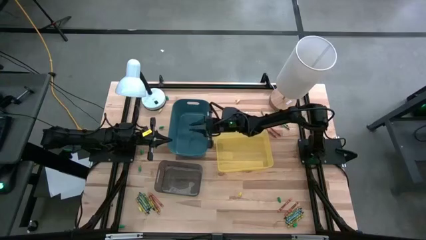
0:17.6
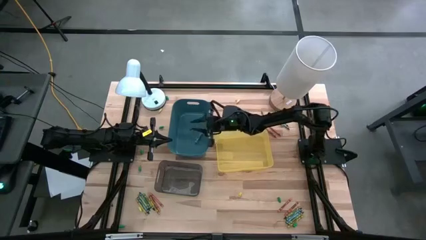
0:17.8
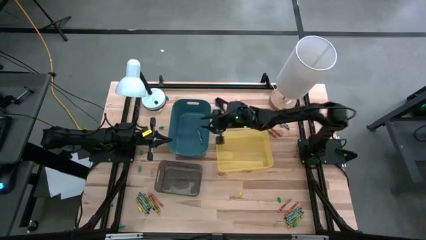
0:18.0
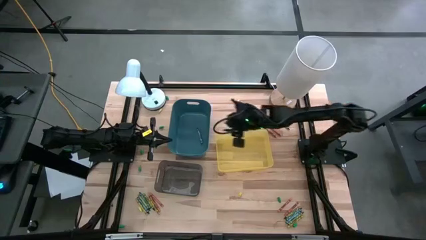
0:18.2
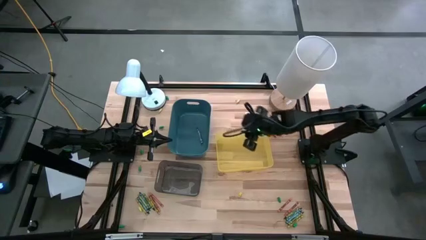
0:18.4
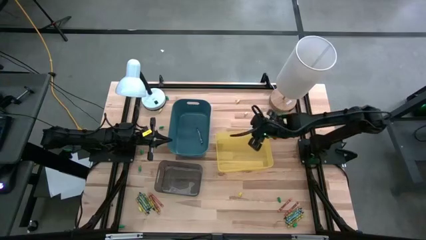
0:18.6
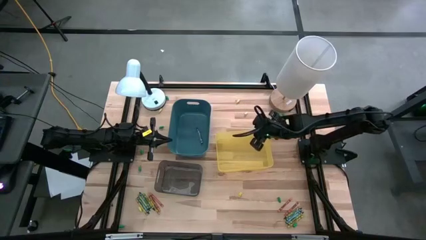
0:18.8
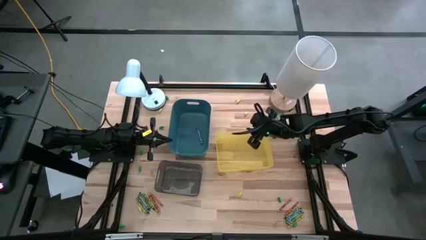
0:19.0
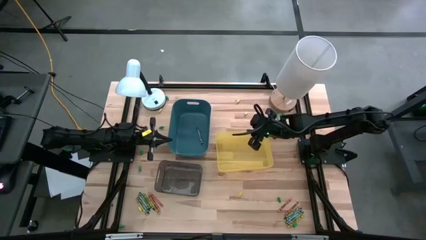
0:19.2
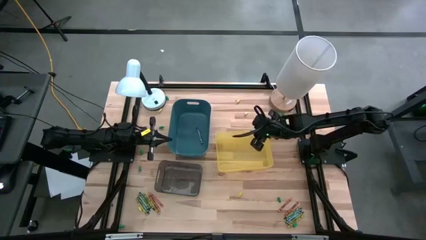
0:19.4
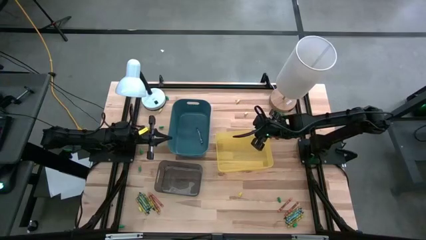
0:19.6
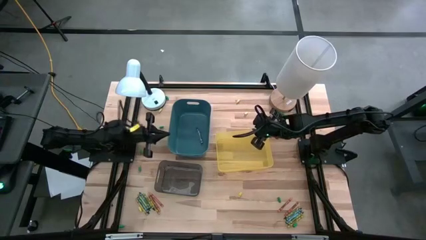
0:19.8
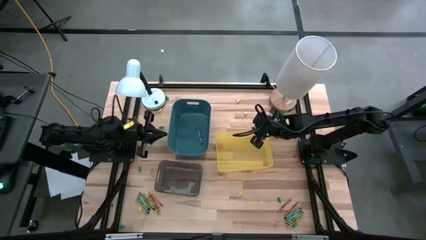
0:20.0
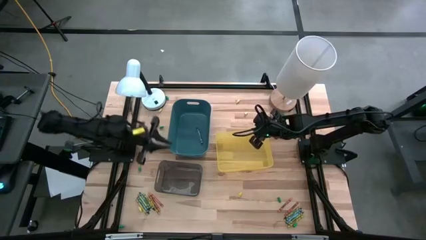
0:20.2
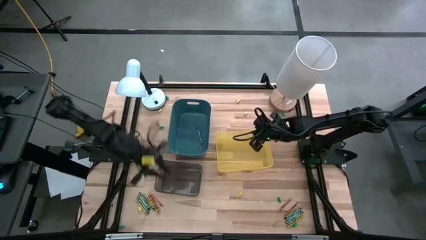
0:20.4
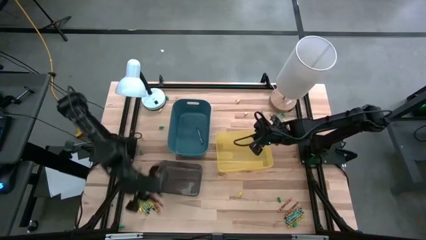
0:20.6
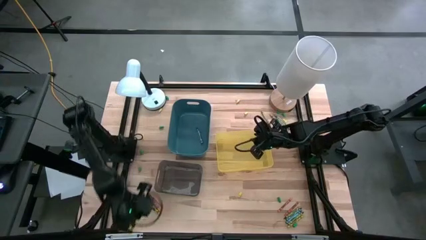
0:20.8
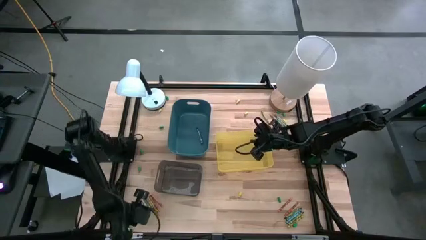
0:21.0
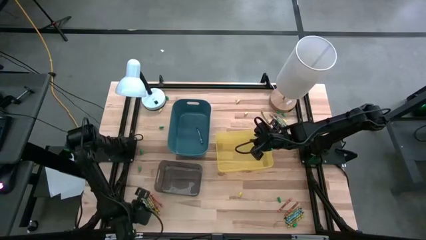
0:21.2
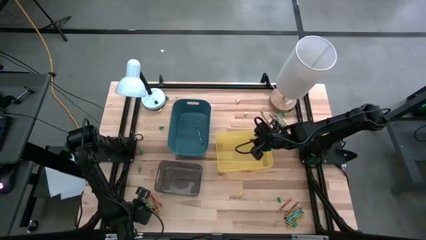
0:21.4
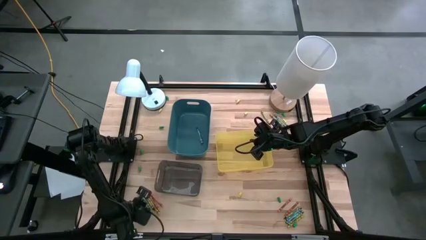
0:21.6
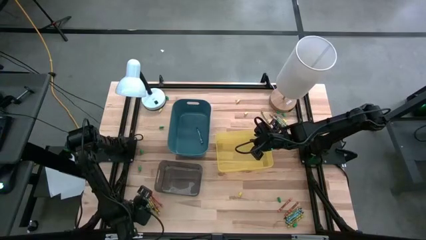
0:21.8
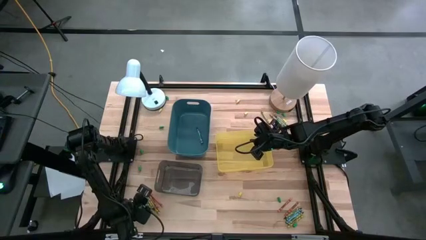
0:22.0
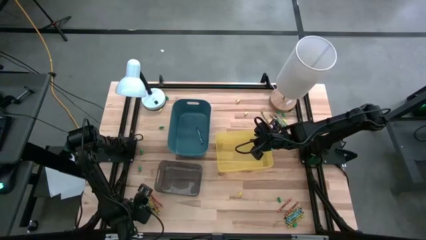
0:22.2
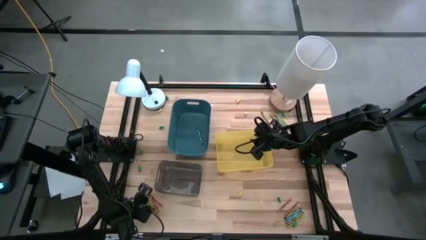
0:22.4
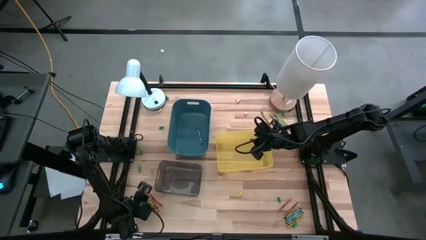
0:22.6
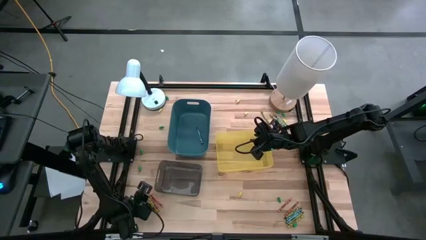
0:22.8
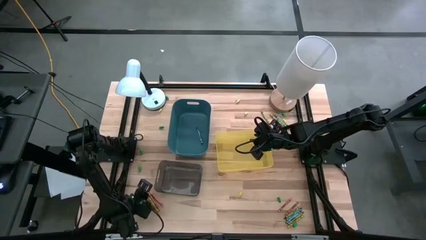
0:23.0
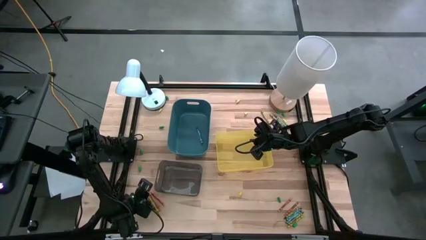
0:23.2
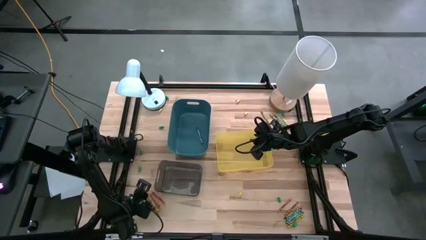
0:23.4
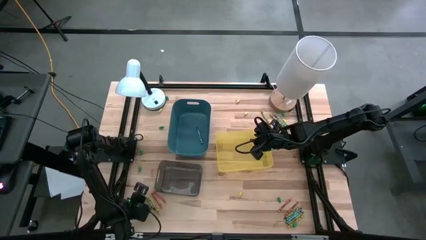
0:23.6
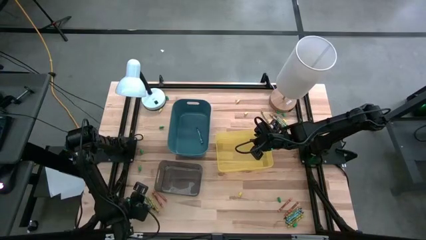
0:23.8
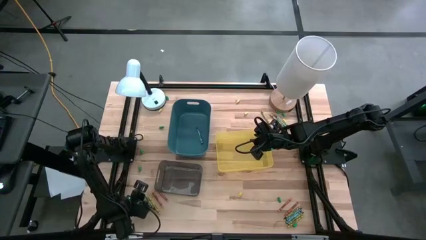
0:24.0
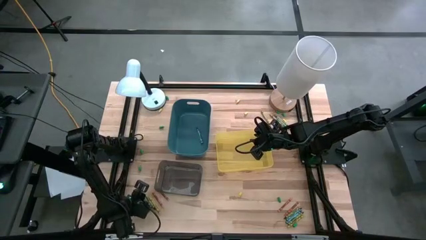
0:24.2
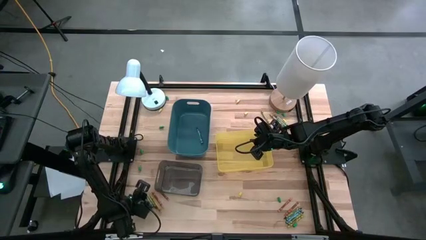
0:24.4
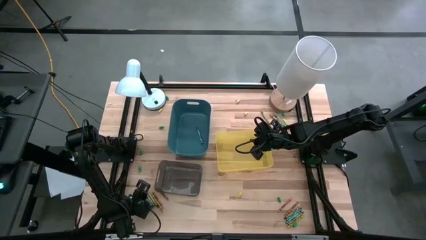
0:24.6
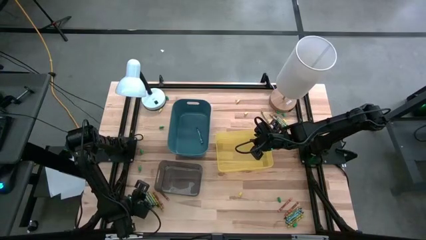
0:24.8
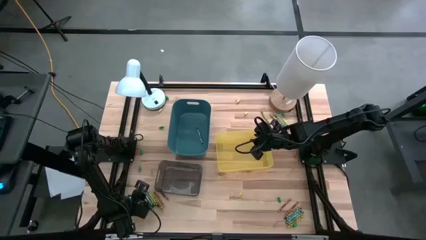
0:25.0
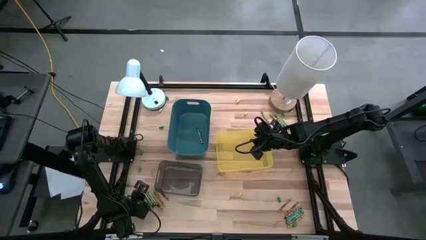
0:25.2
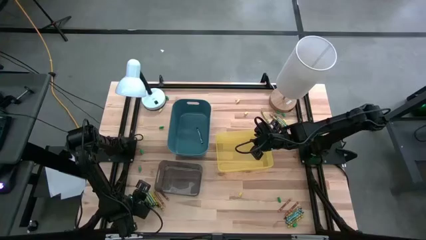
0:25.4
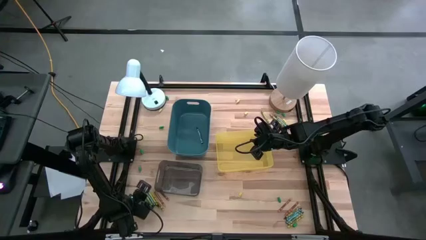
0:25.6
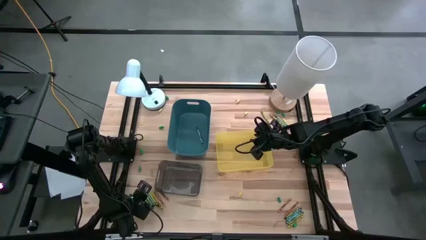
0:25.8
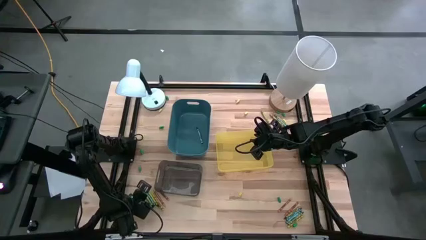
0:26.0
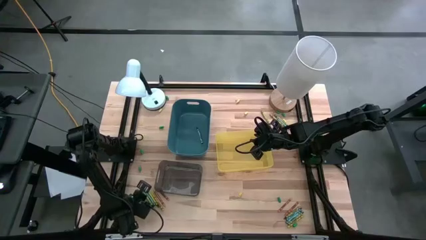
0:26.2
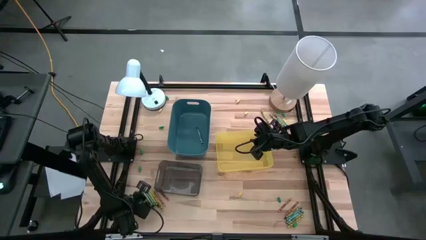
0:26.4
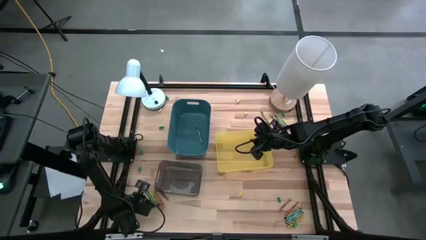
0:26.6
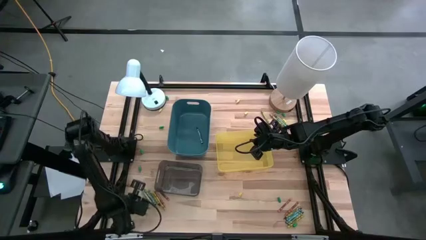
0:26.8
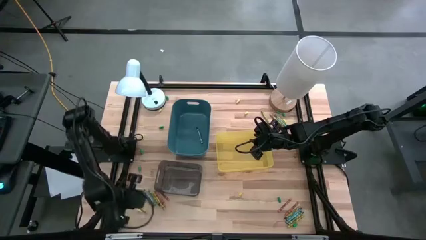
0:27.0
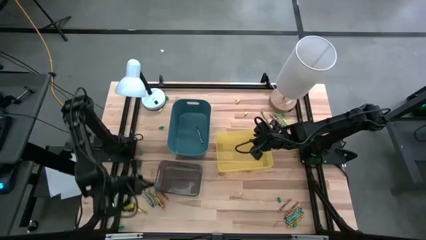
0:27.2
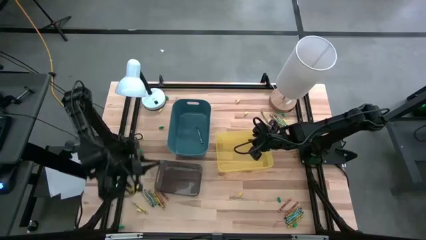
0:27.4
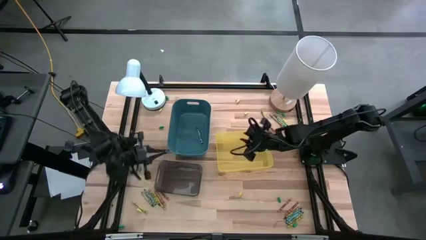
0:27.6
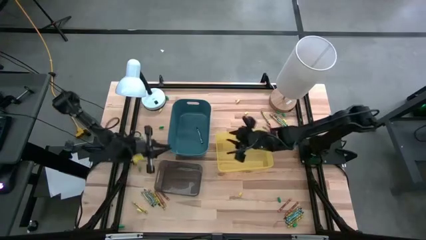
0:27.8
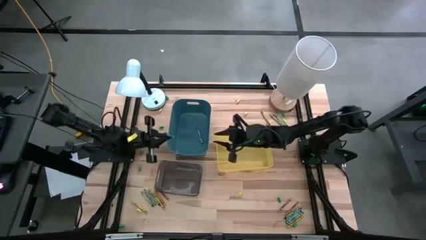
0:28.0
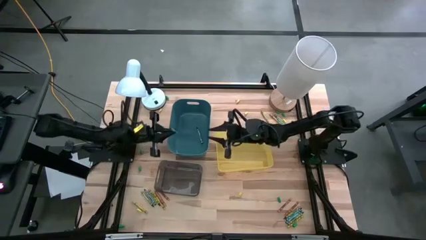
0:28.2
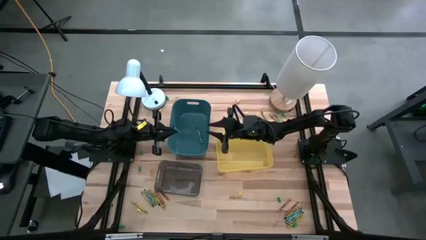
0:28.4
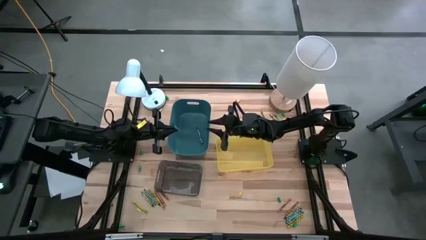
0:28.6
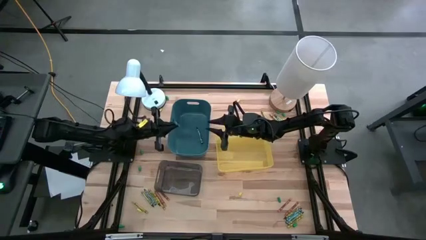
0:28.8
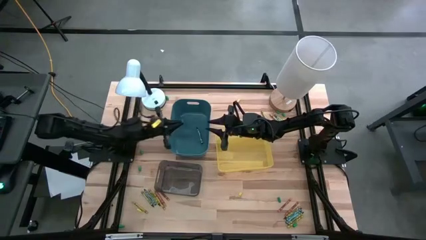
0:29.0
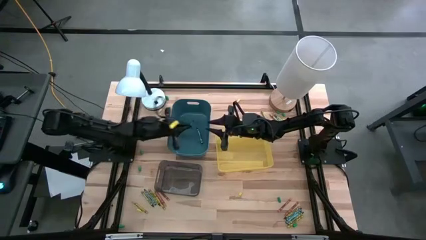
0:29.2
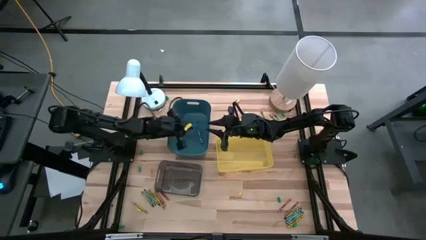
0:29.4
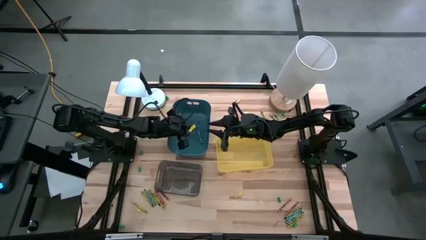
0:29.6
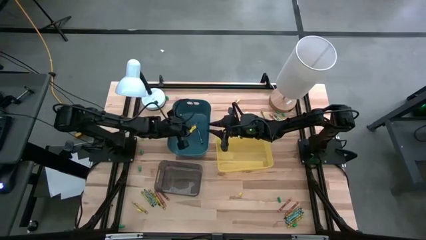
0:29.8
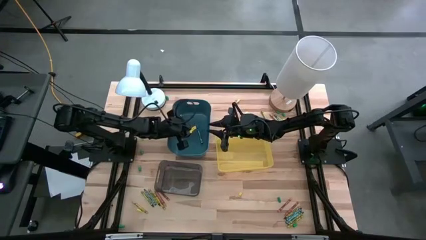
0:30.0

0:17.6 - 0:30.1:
Task: Sort crayons
Put the blue crayon into the blue bin

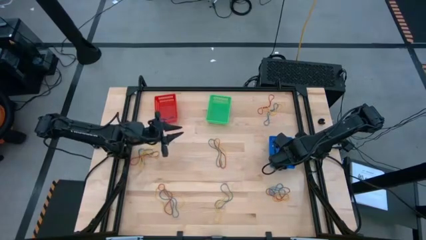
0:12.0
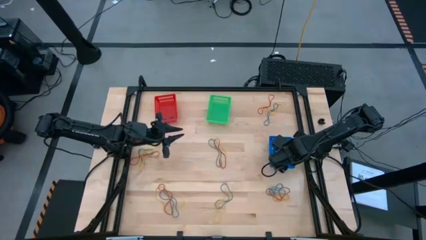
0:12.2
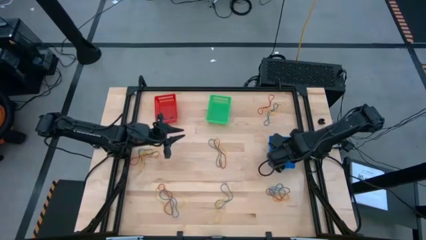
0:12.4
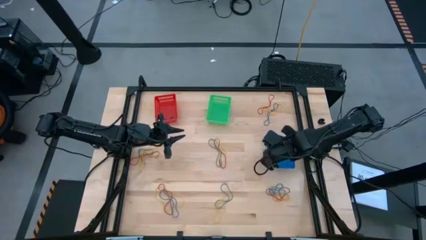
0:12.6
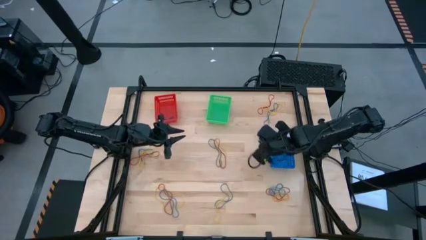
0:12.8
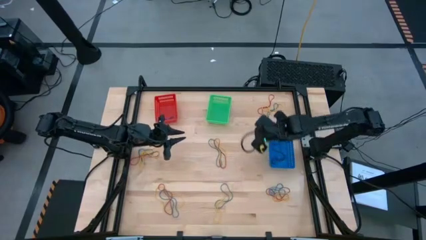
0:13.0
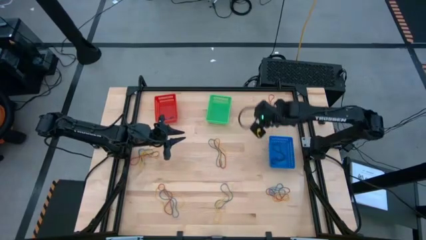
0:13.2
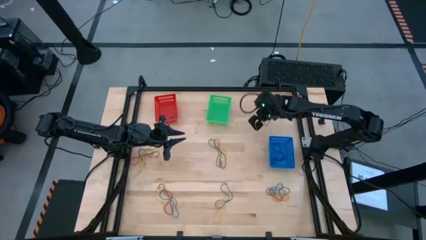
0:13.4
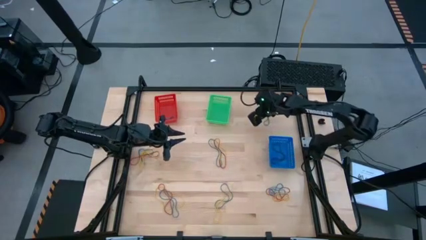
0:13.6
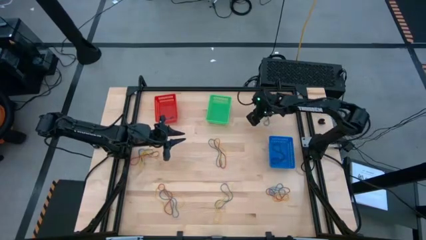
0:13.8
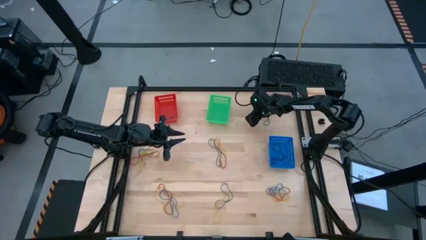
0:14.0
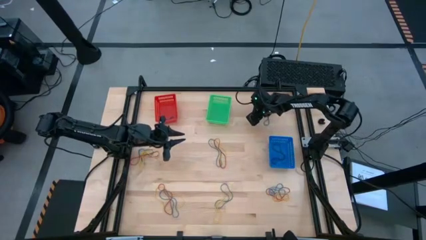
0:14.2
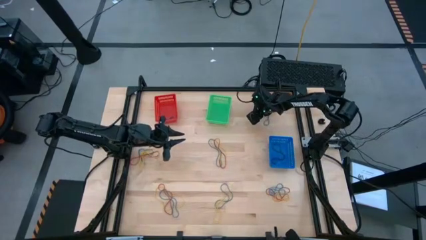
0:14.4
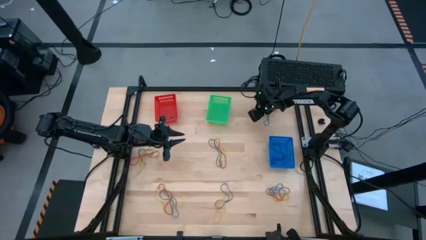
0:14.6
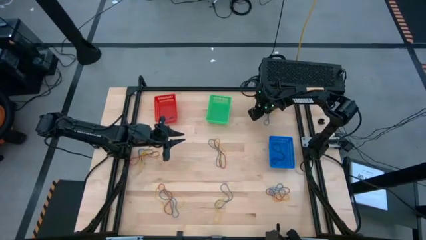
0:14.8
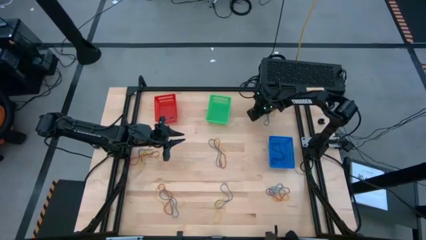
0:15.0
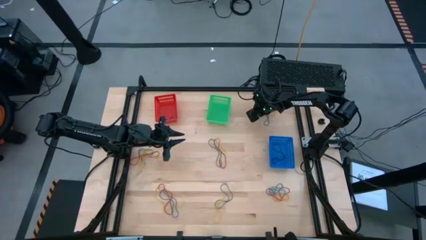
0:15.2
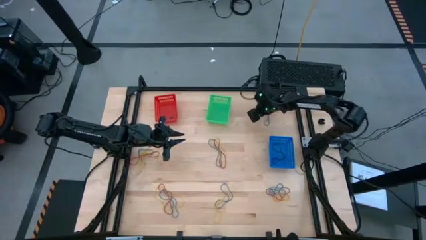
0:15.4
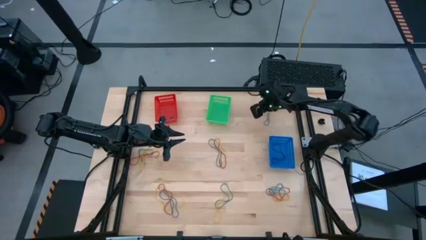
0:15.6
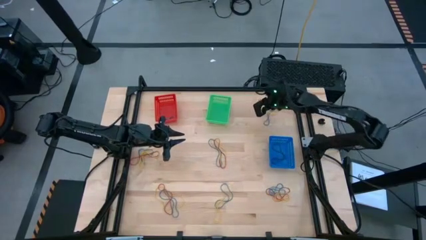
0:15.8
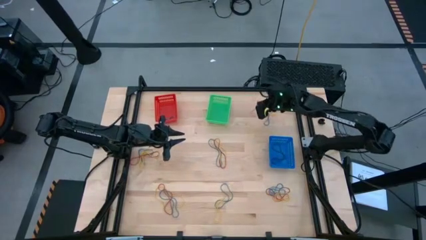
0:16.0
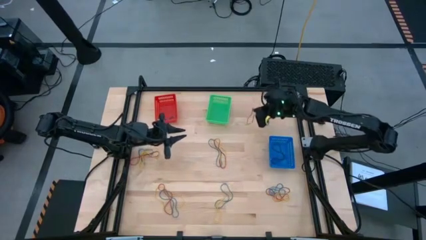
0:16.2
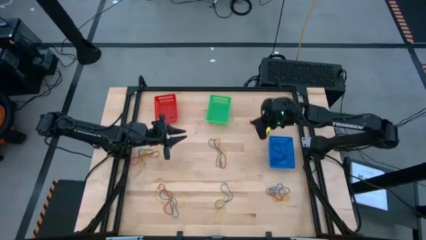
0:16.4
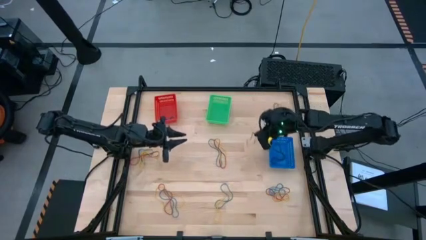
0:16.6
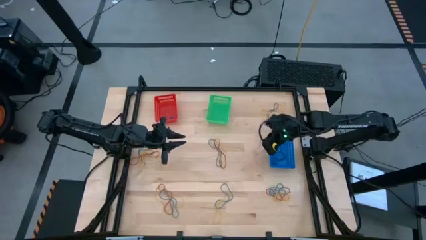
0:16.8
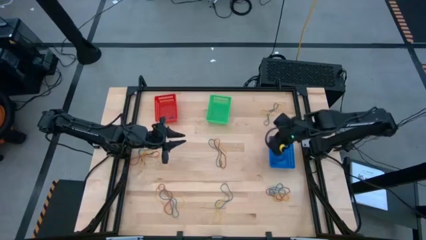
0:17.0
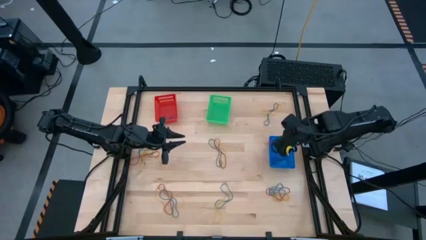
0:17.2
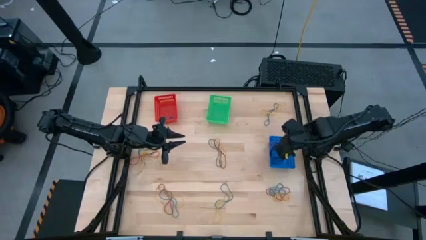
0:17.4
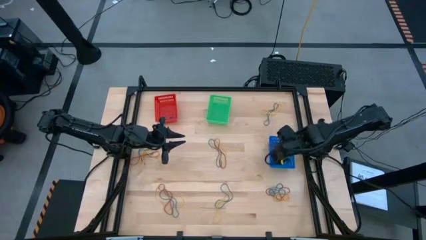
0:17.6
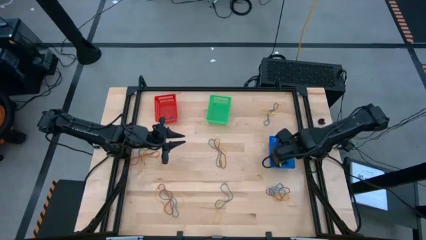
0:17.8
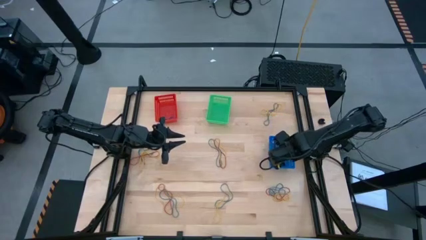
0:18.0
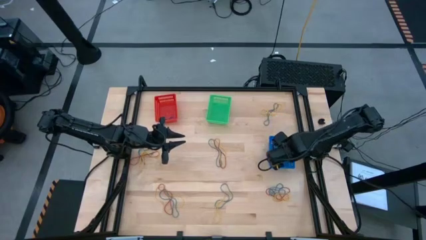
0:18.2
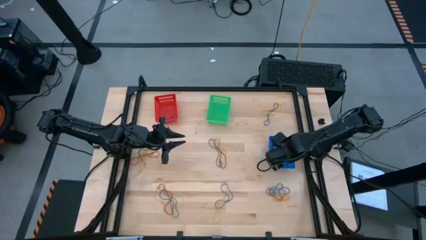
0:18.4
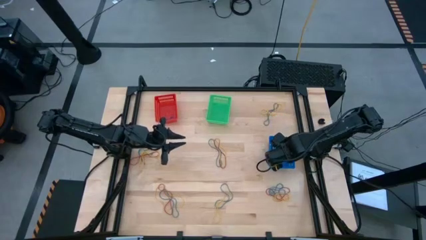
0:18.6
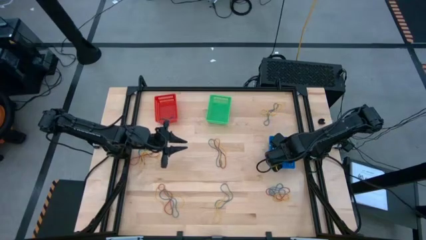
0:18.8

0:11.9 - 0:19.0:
Task: Sort rubber bands into baskets
Put the red rubber band into the blue bin
